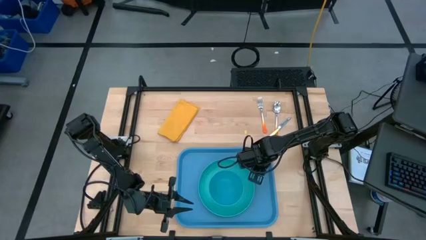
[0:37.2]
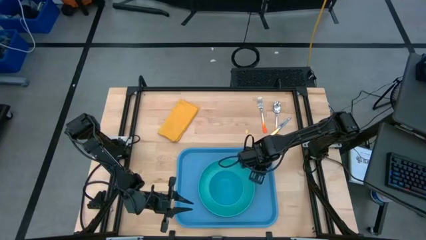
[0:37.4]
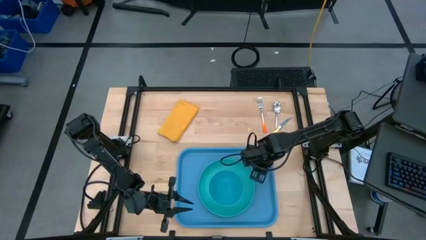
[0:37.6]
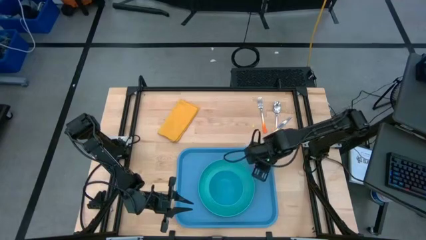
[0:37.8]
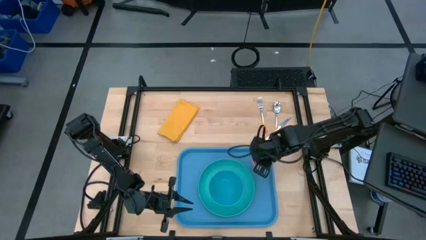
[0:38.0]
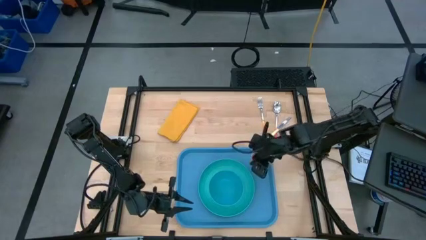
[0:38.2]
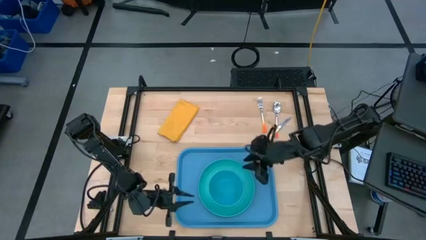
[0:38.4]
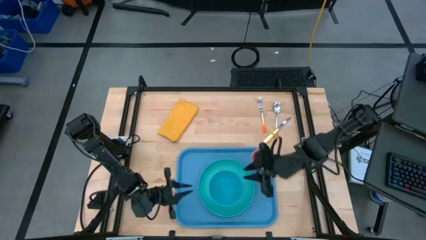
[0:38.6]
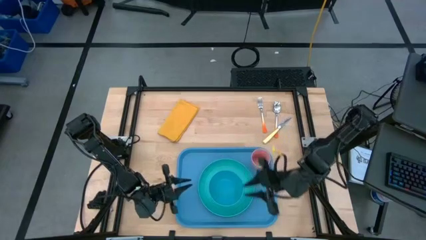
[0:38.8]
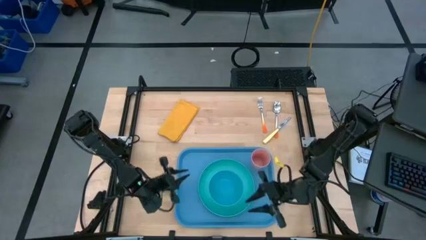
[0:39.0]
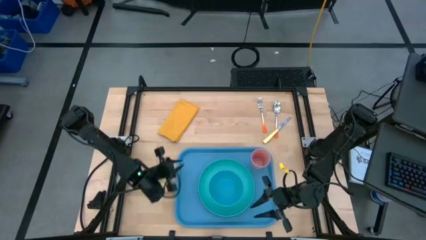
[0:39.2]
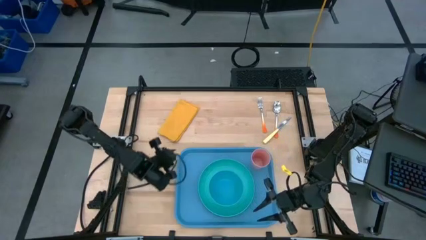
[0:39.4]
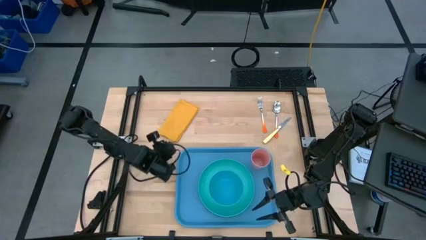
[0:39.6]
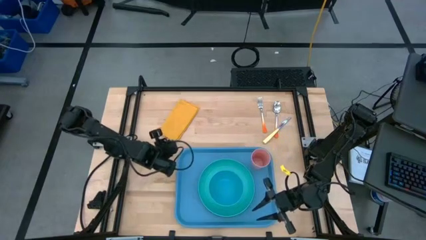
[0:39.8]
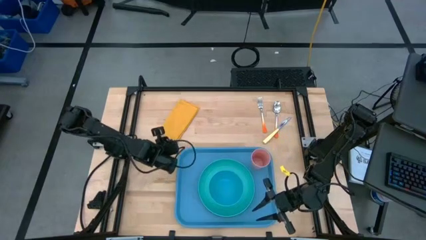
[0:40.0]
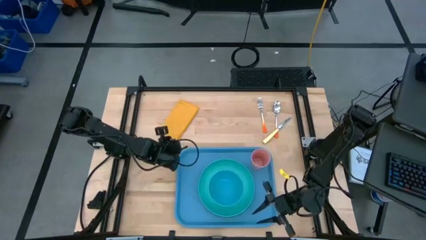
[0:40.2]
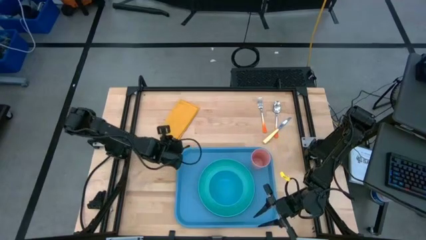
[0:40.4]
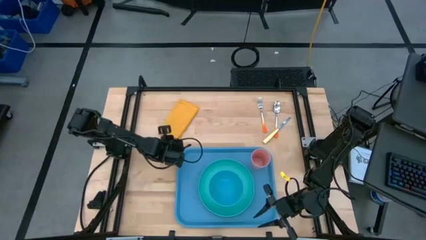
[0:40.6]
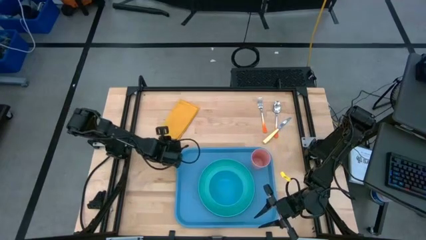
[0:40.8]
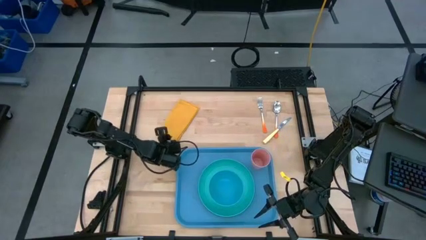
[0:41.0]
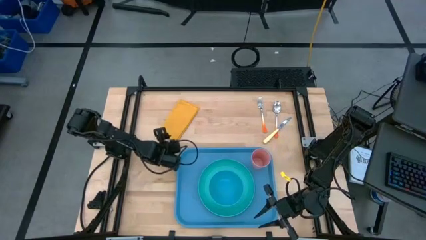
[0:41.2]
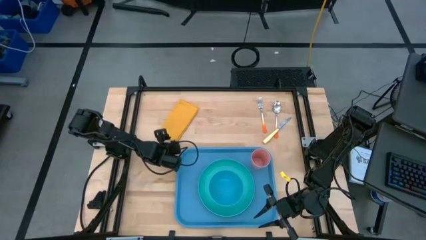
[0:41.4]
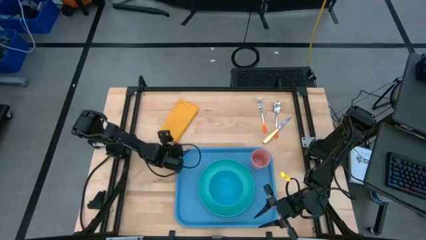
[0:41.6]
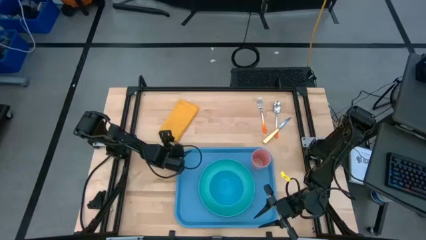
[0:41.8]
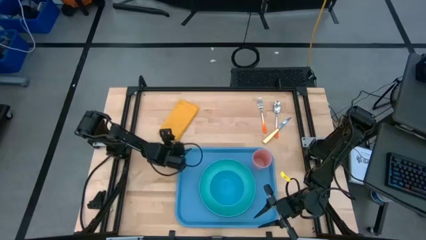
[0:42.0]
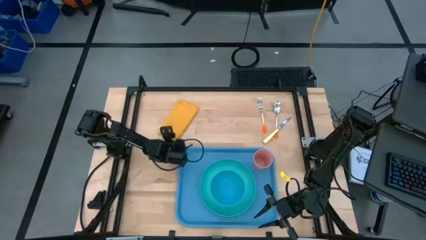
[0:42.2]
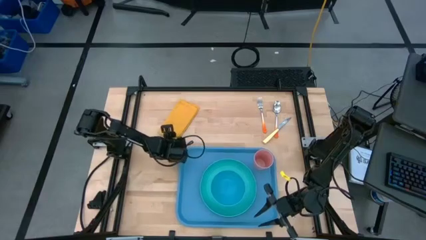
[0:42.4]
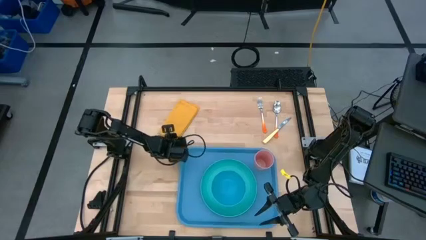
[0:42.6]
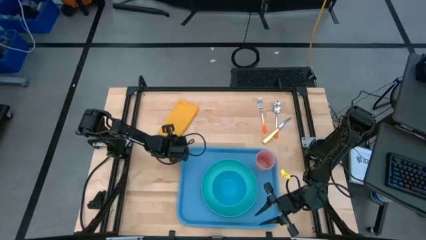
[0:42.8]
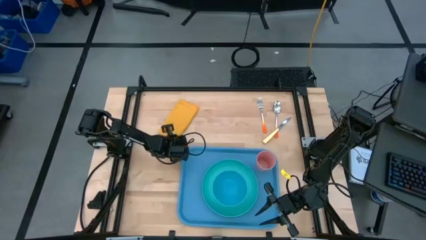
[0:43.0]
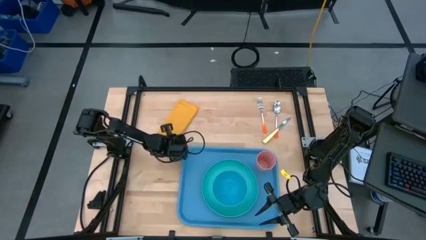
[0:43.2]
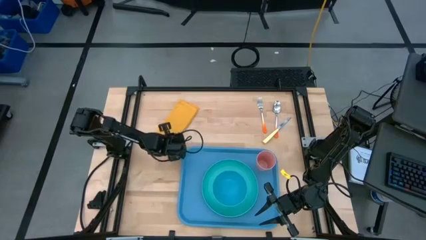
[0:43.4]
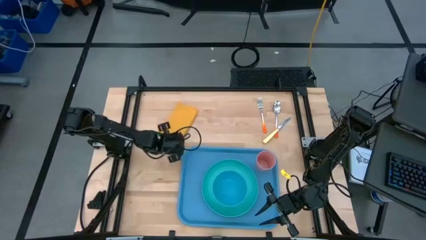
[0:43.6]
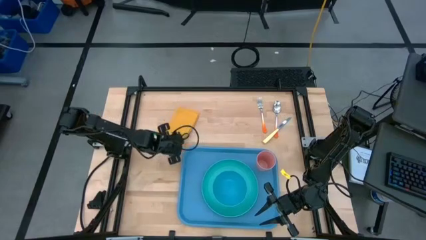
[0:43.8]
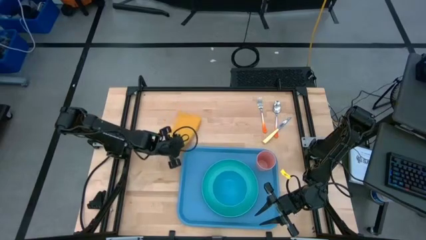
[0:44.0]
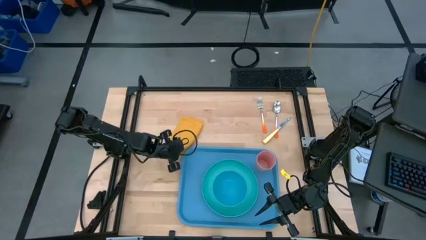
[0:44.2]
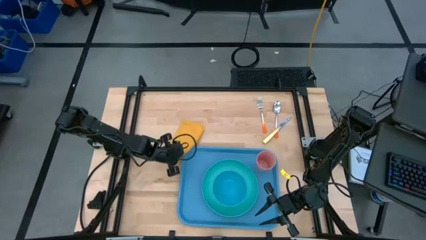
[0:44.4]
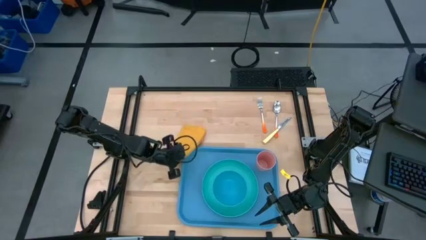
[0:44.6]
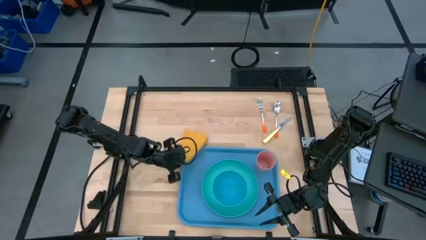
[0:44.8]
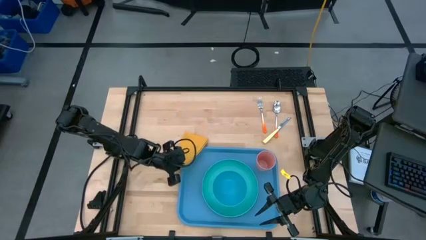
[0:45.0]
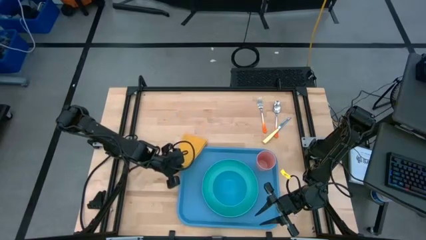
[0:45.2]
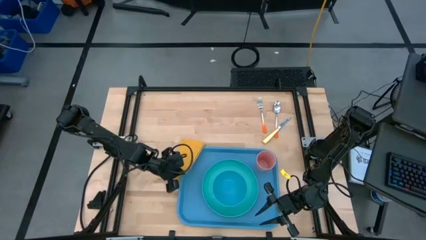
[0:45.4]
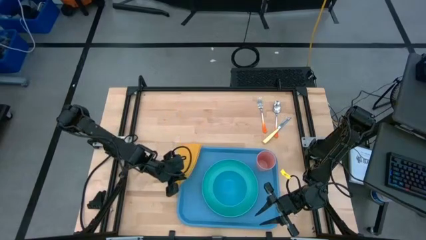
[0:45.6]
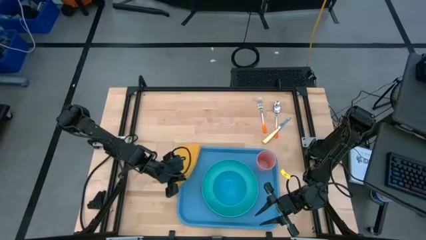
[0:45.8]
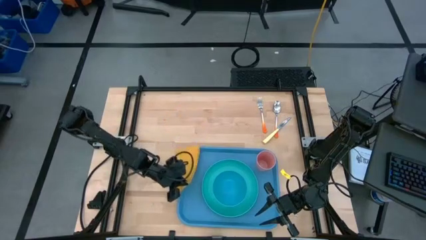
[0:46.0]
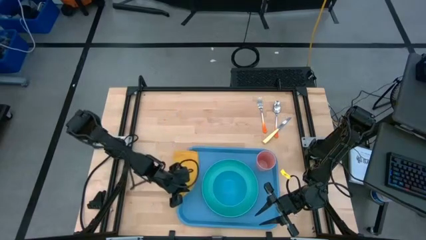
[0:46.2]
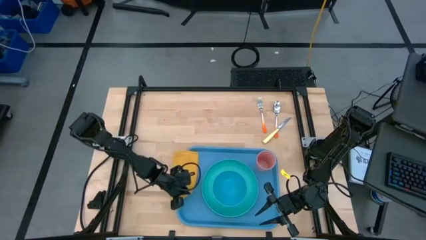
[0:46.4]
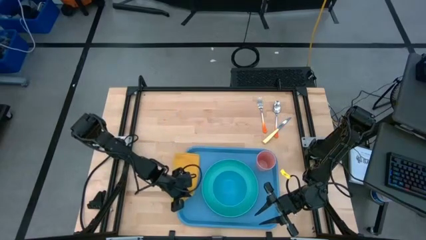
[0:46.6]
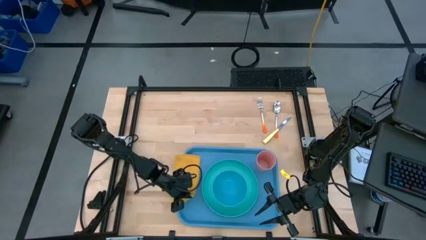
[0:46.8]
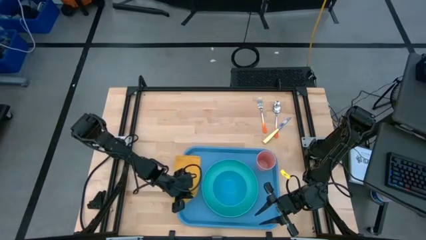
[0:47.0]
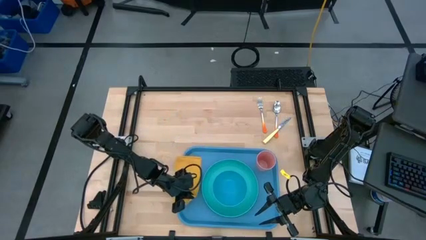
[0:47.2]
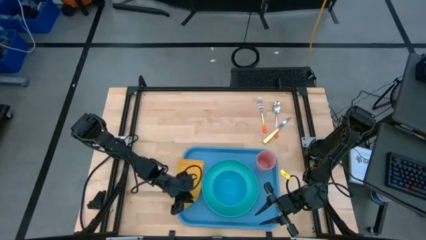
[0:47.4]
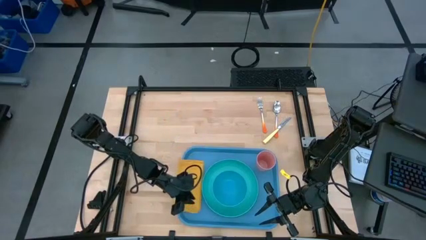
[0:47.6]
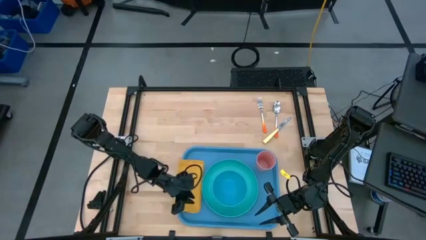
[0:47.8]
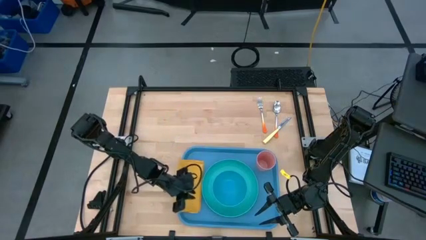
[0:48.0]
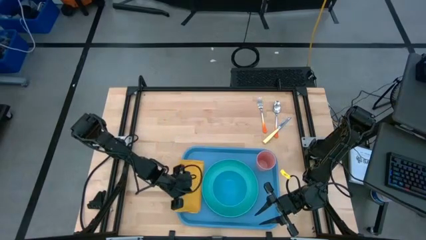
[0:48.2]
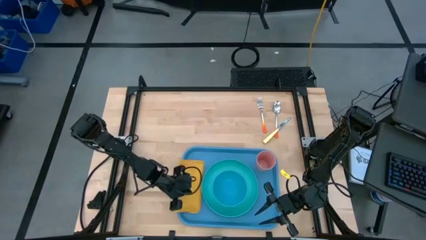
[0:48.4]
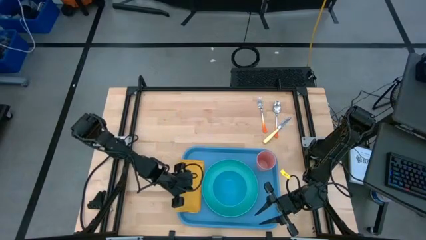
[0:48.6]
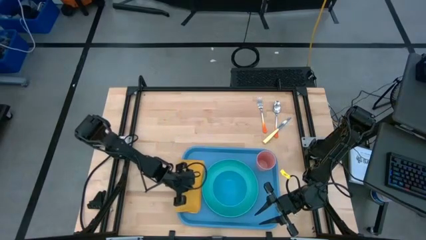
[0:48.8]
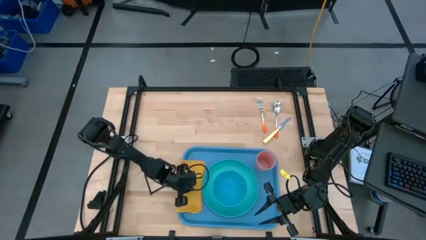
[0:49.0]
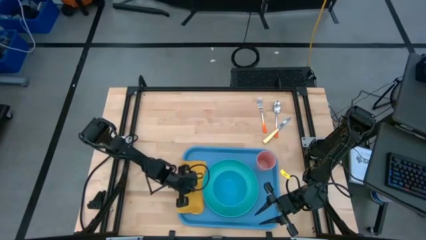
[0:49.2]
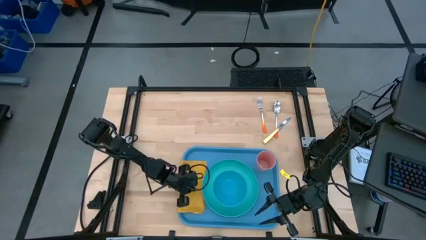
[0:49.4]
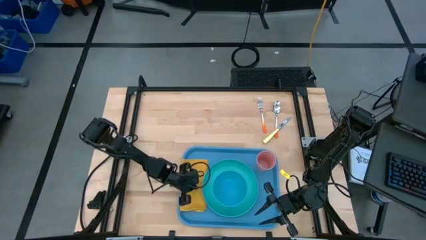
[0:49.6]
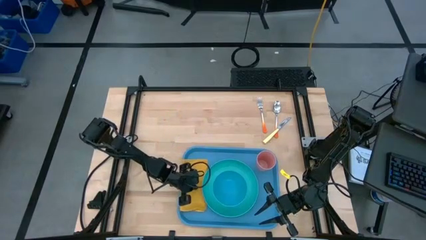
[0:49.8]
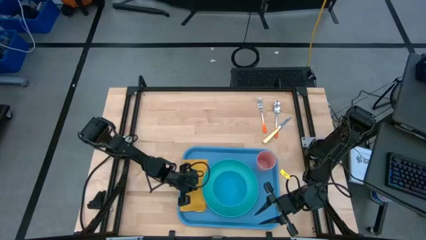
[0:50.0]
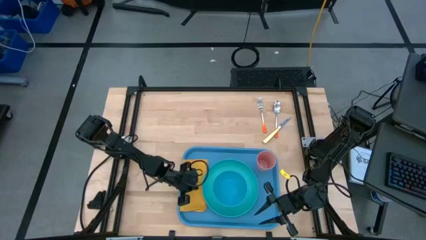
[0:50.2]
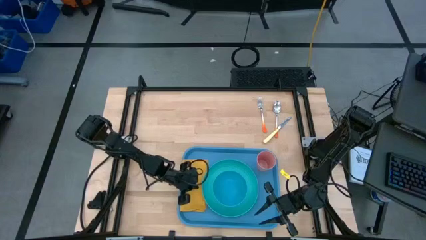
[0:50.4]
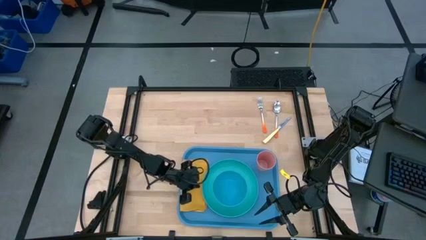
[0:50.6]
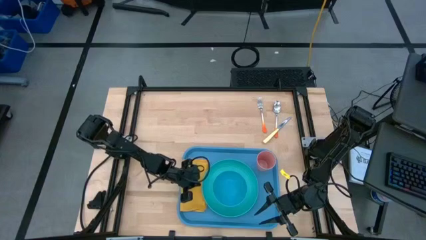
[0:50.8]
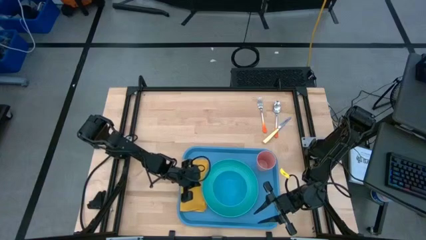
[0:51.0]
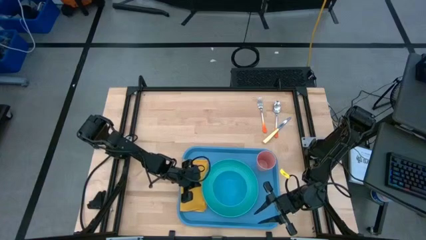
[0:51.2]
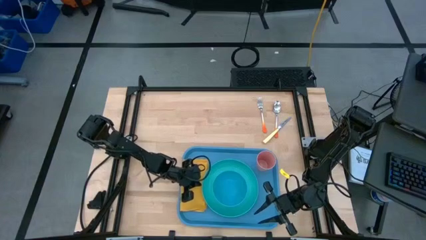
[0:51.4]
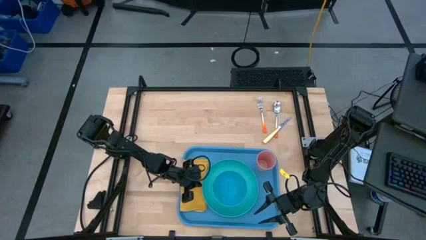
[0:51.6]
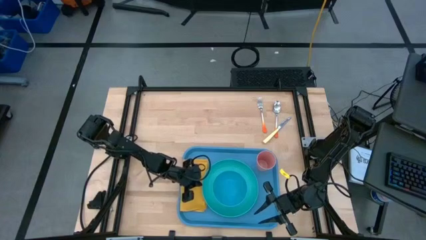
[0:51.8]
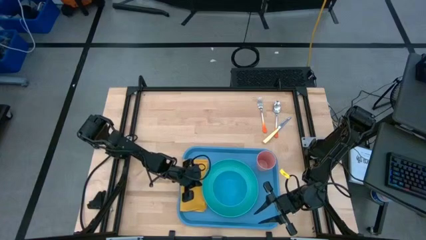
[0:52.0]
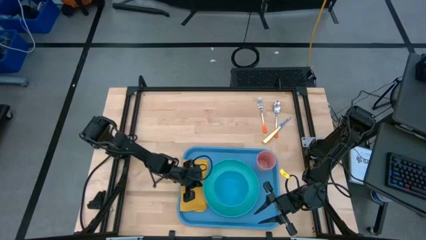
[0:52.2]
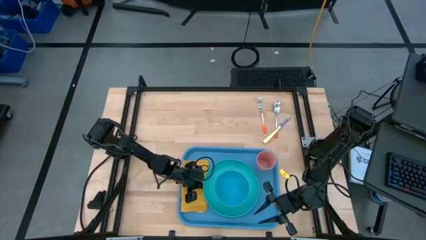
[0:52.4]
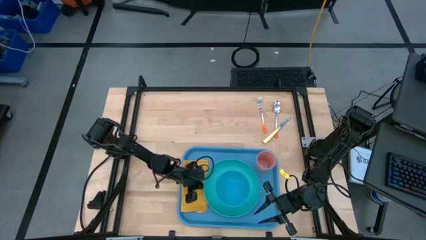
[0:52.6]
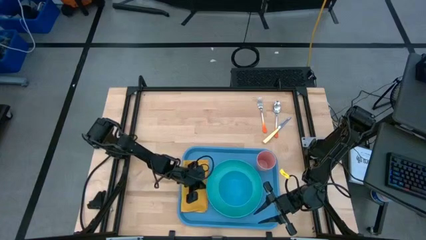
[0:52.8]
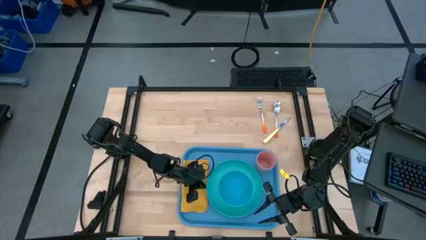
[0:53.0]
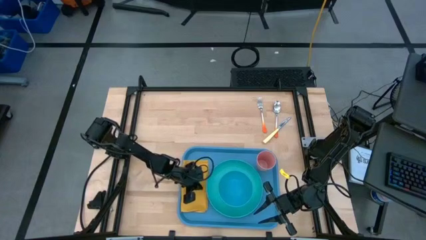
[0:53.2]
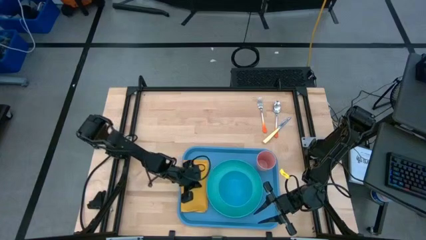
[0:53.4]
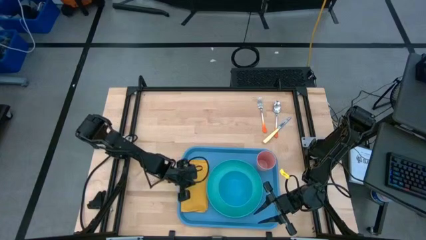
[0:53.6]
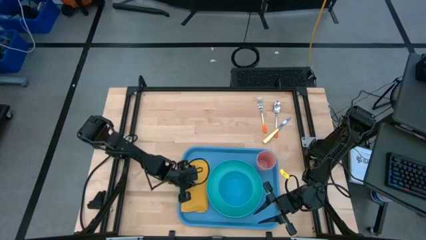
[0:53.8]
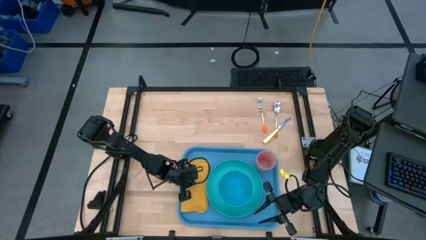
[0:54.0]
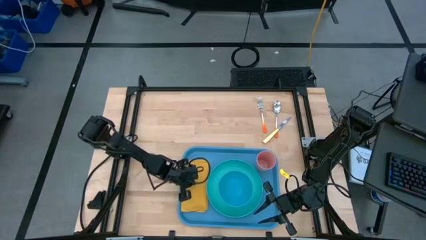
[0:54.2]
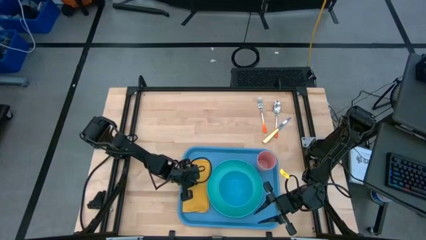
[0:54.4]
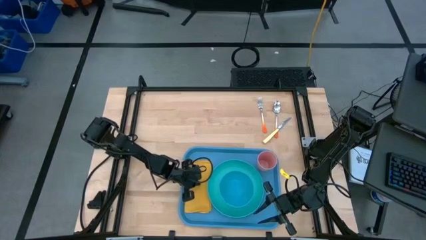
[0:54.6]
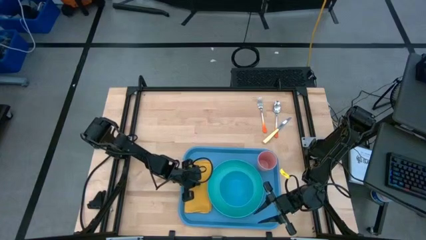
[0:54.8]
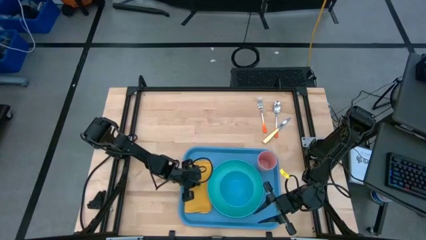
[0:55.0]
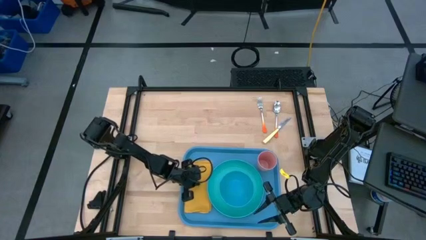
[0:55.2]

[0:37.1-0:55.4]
Task: Set up tray
Put the napkin to the left side of the plate on the tray
